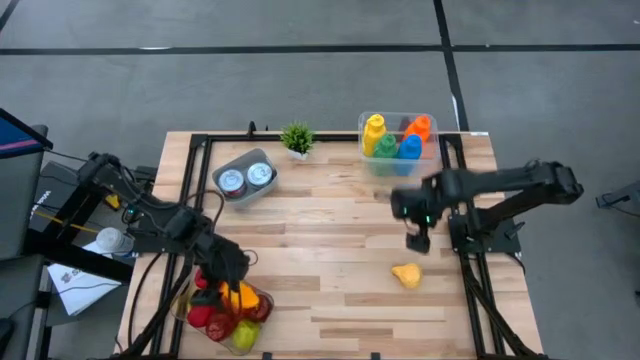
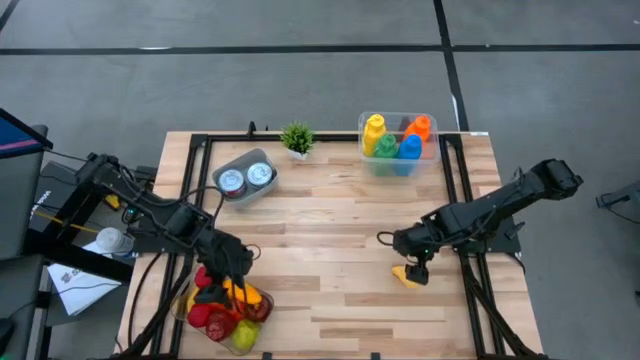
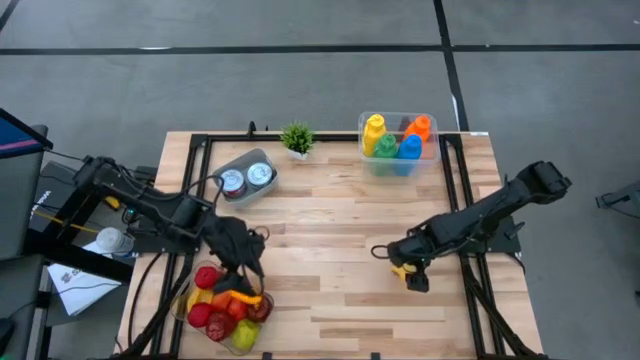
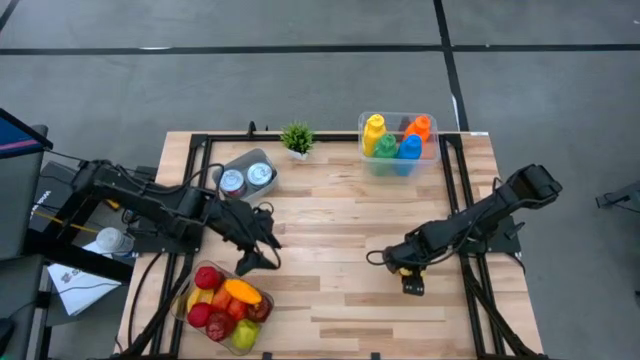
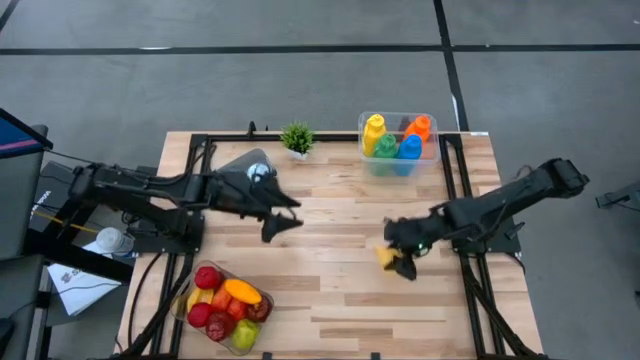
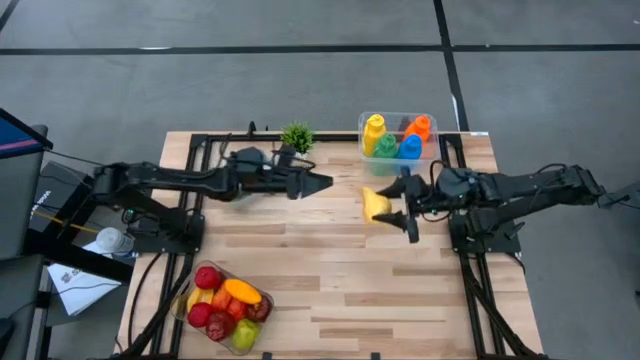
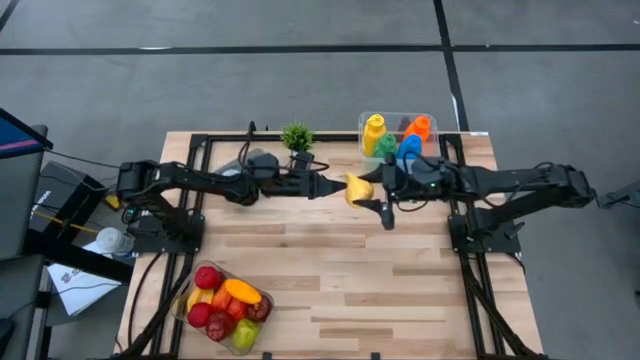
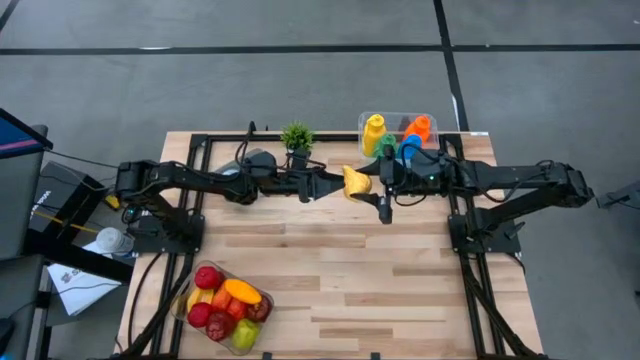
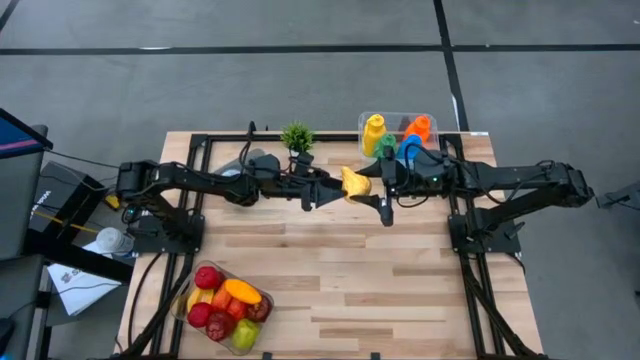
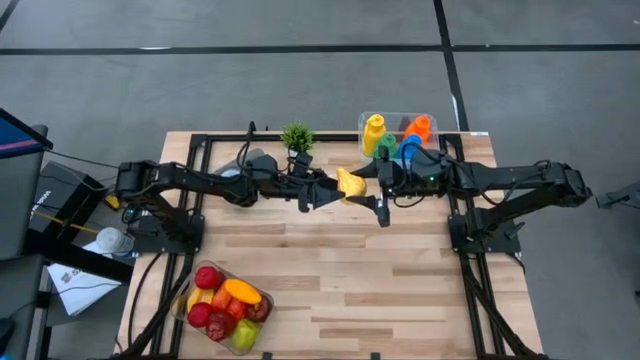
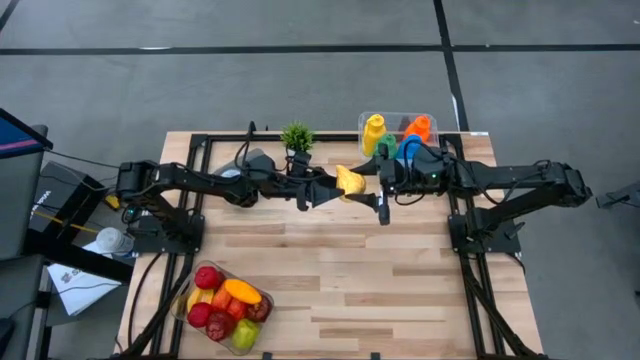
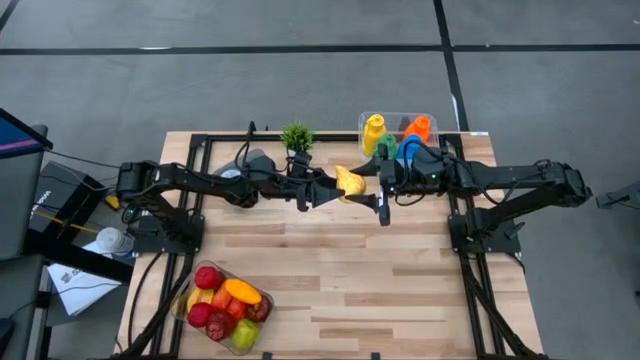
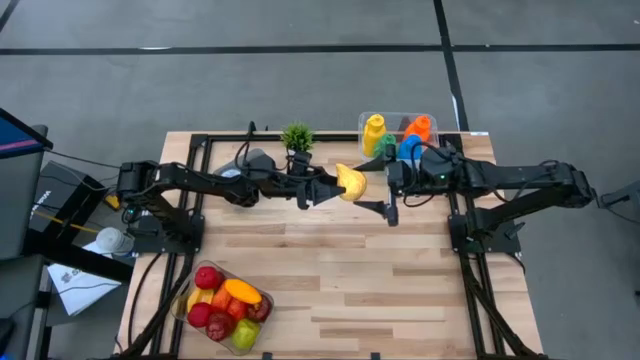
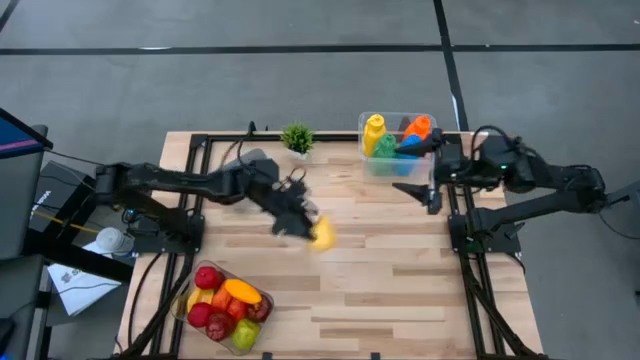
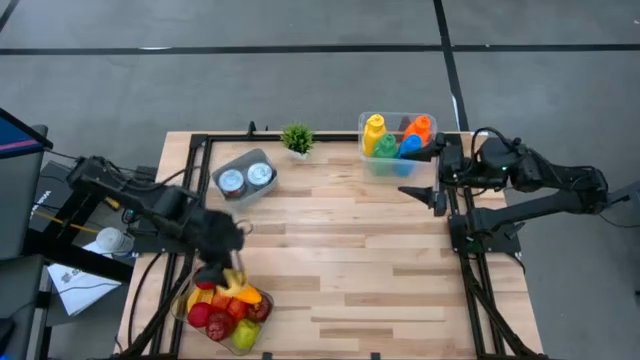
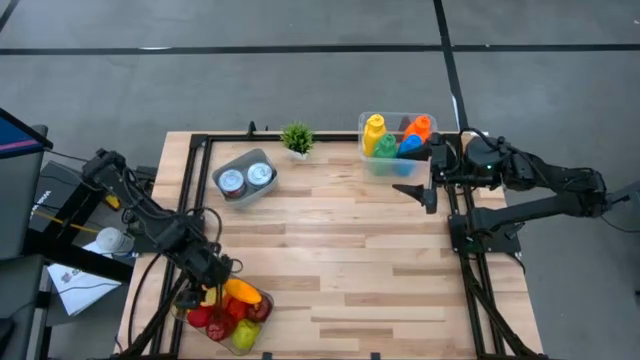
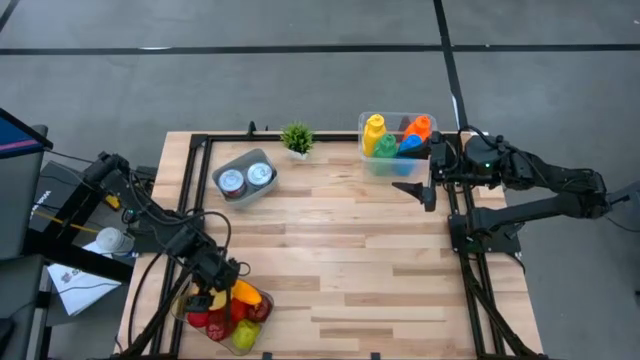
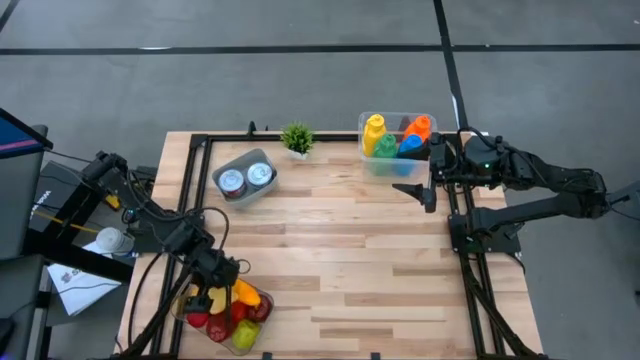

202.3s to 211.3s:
Task: Pick & Place Food Item
Put the yellow pear into the bottom transparent bin

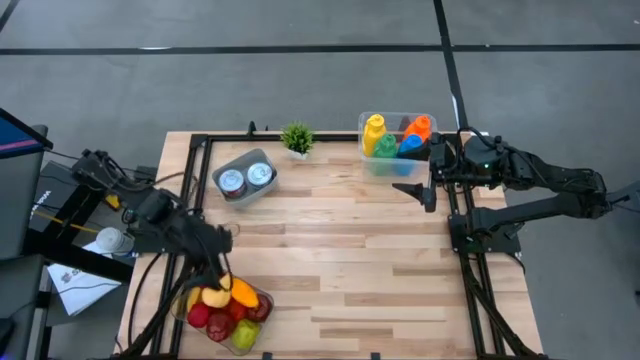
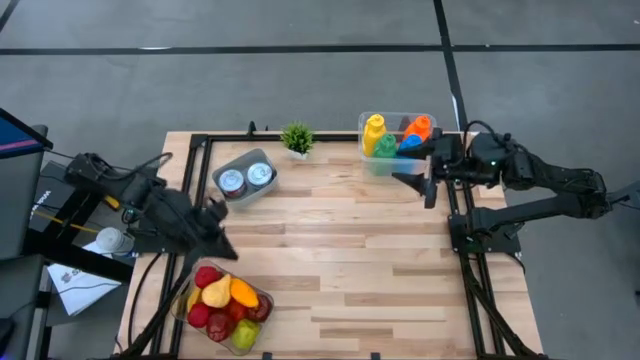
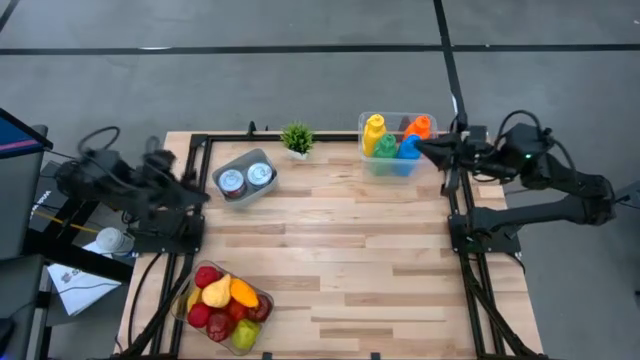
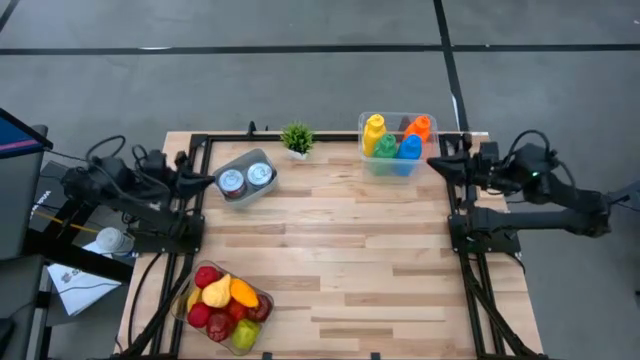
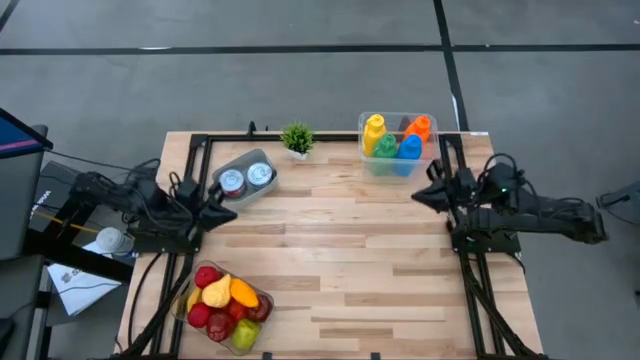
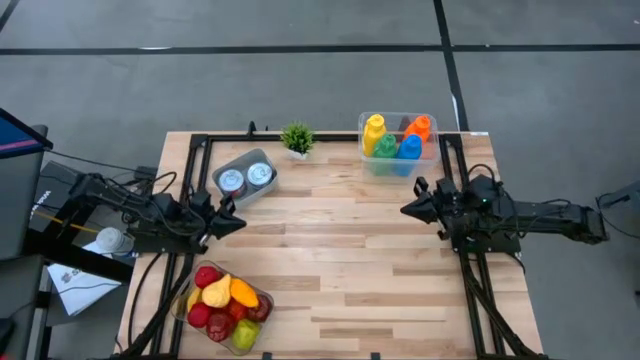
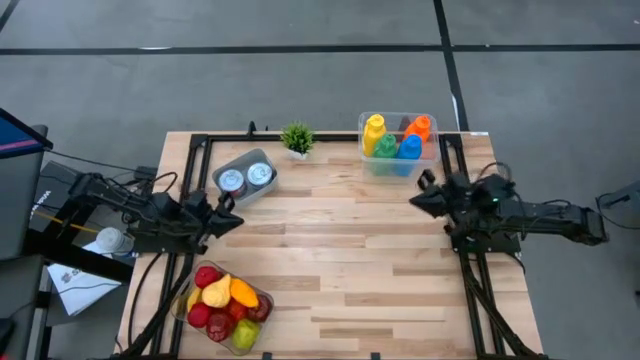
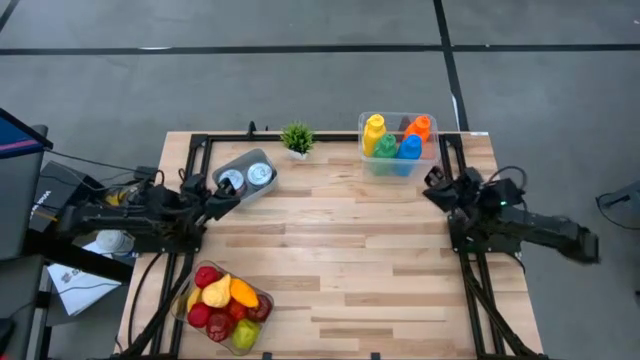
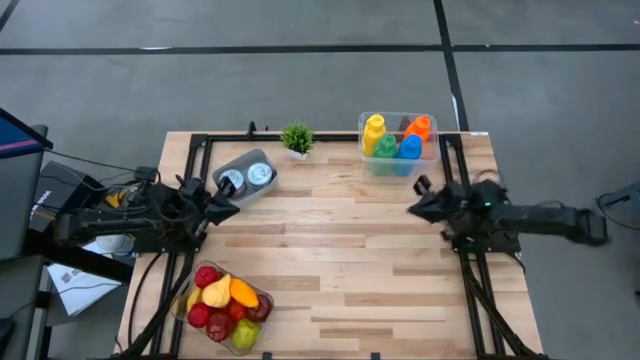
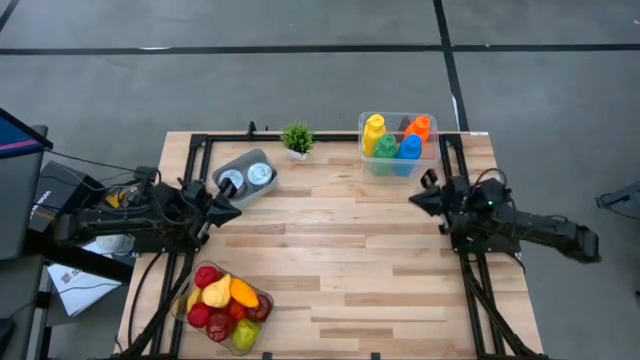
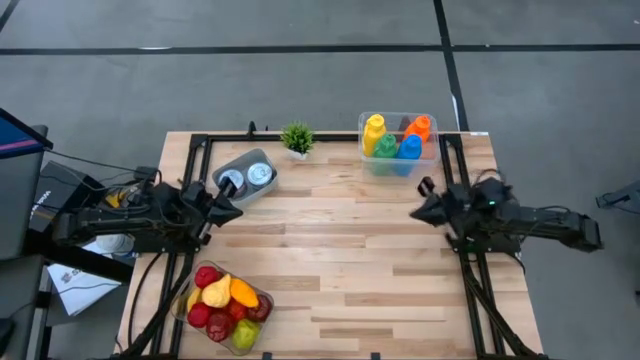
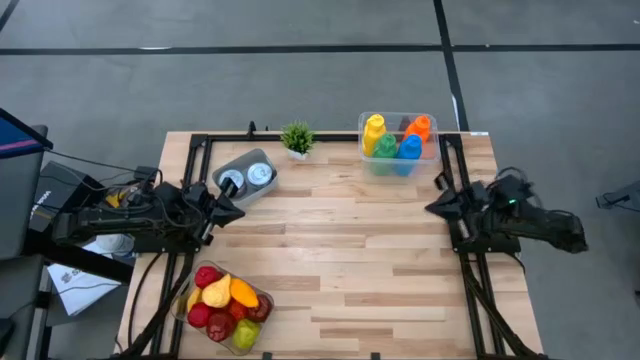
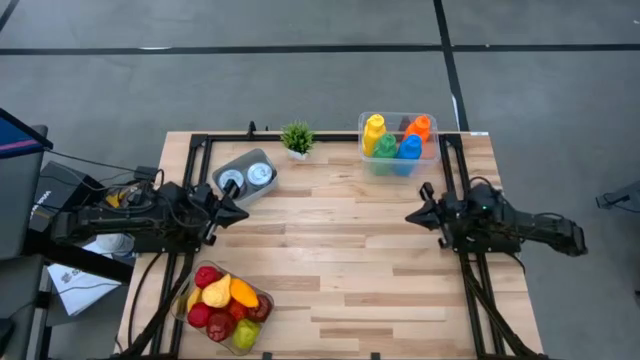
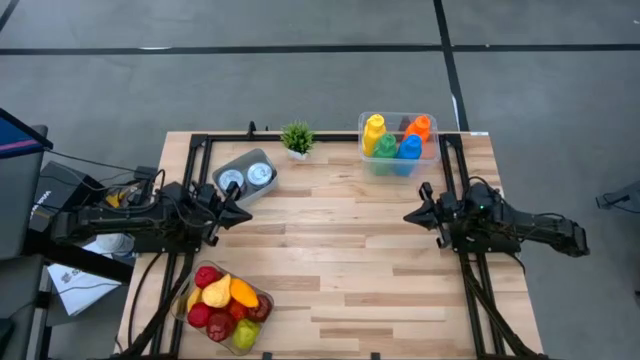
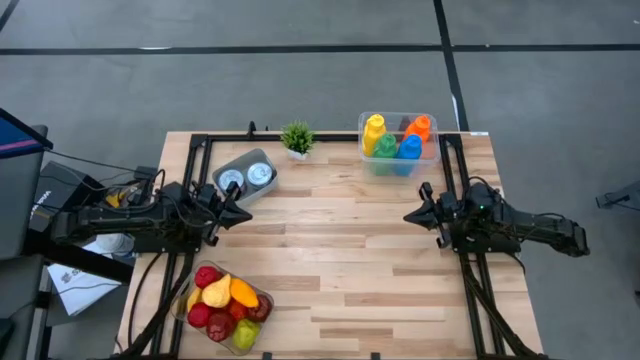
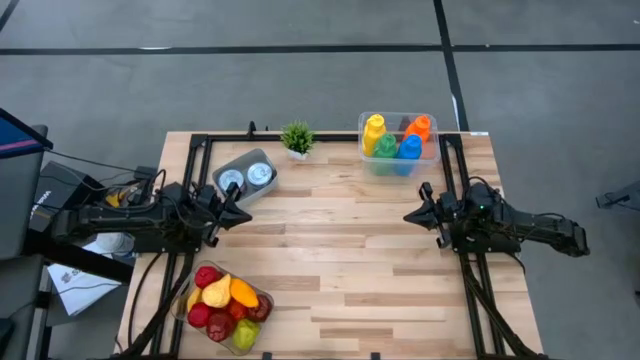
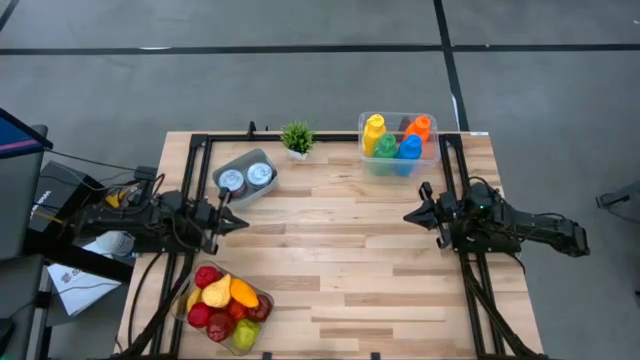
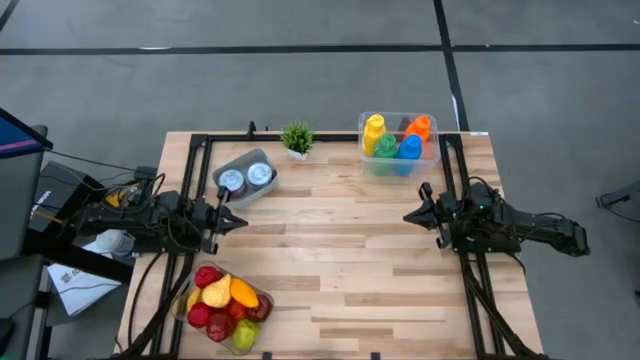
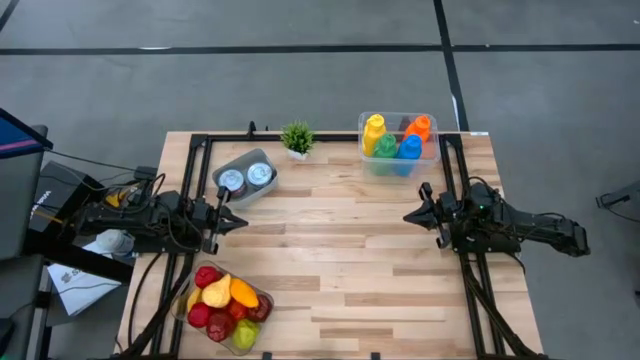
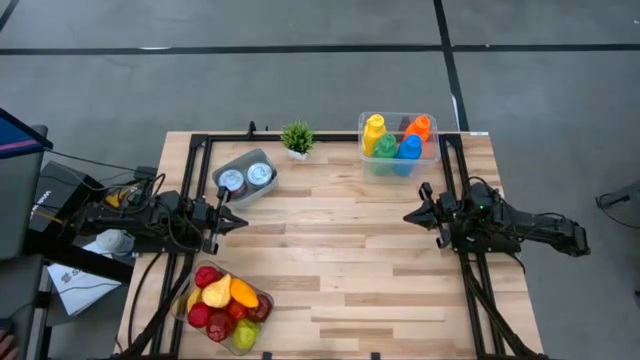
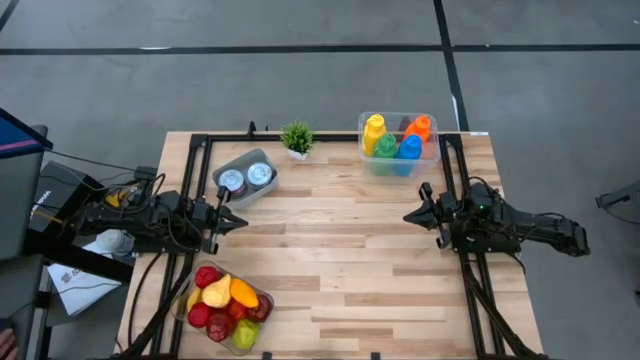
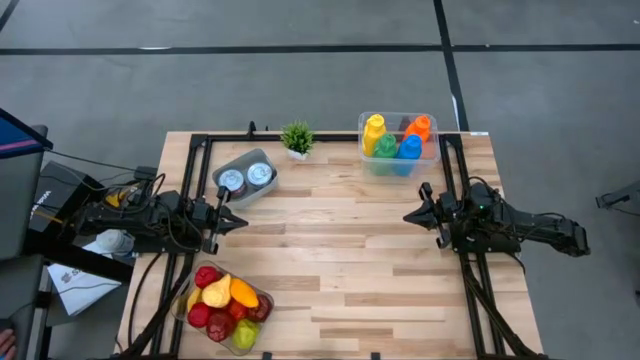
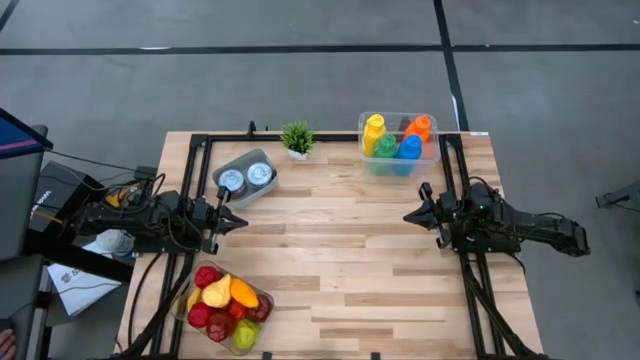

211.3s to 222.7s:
Return to Home Position

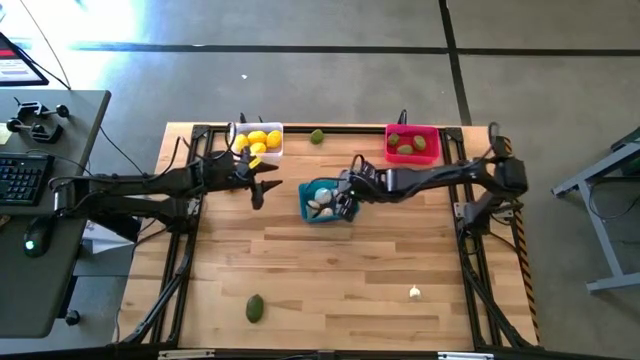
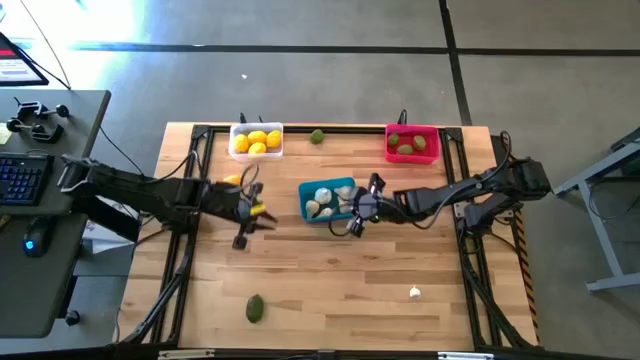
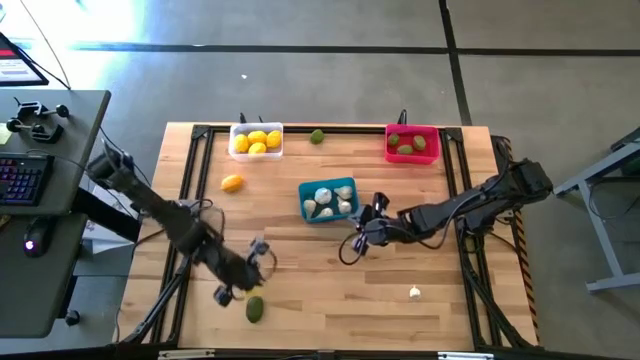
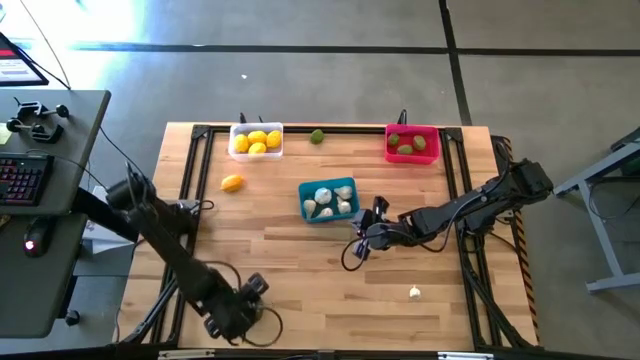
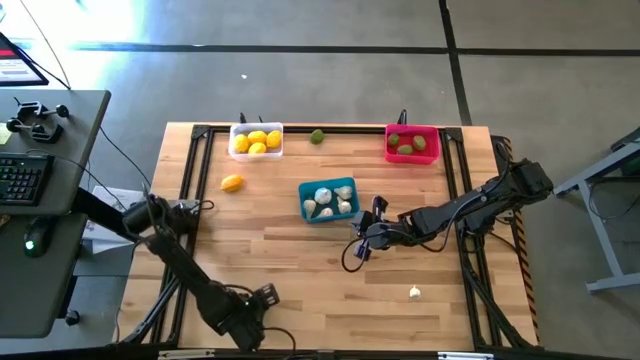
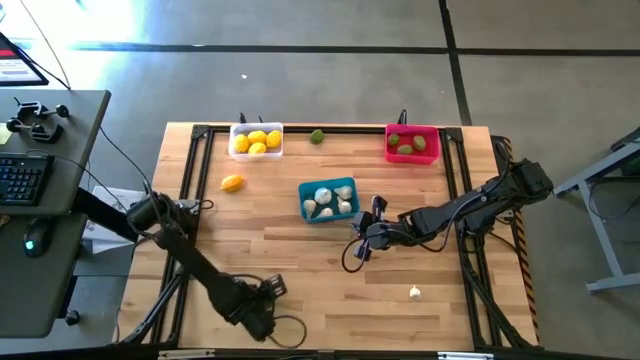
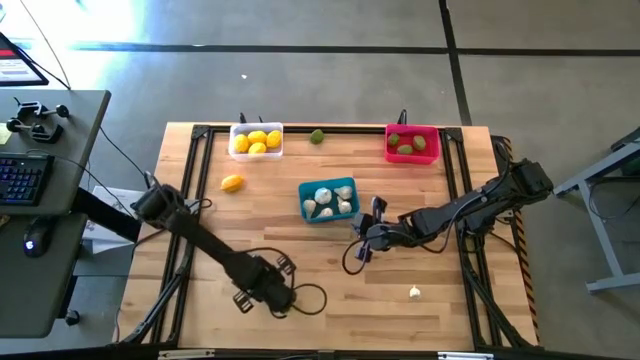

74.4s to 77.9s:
Task: Sort produce into baskets
Put the green lime into the pink bin
